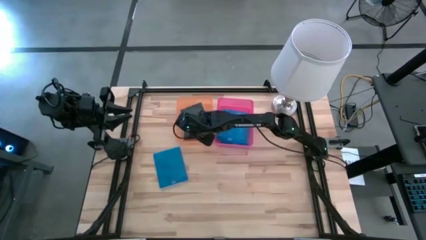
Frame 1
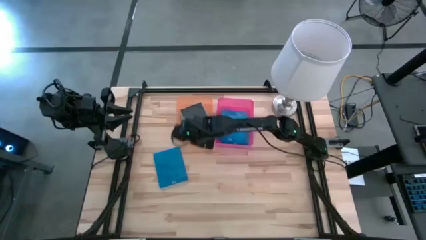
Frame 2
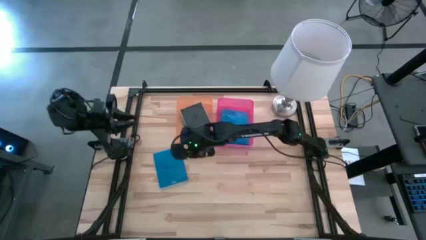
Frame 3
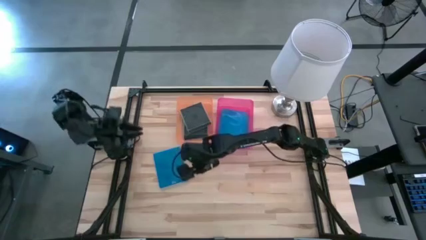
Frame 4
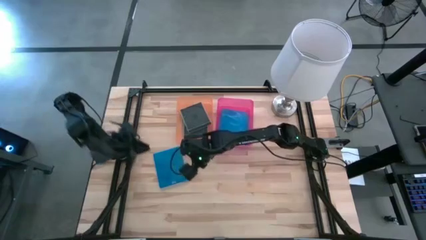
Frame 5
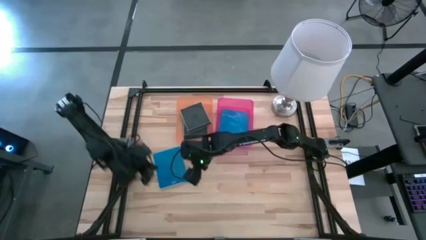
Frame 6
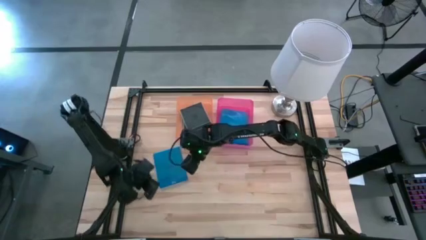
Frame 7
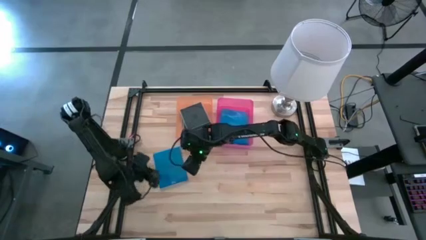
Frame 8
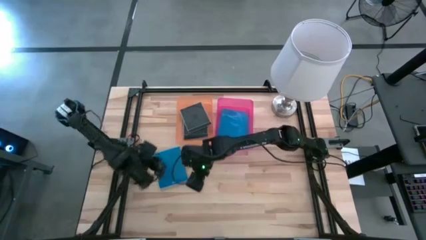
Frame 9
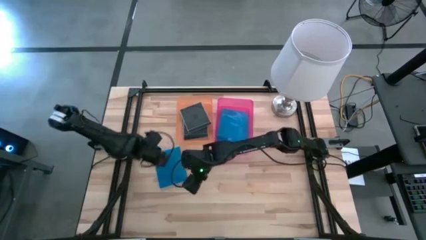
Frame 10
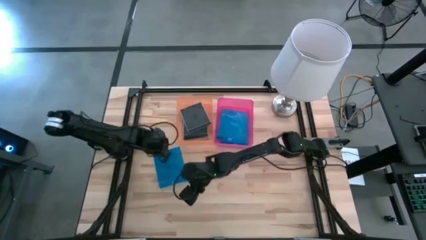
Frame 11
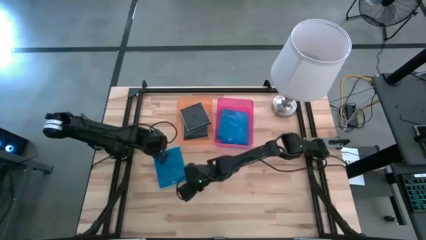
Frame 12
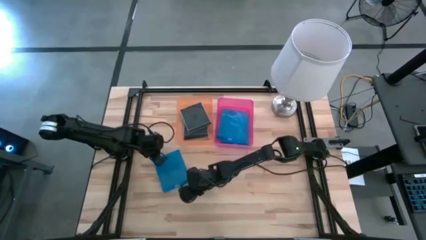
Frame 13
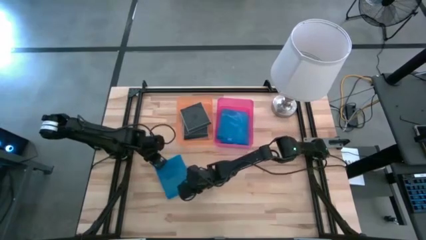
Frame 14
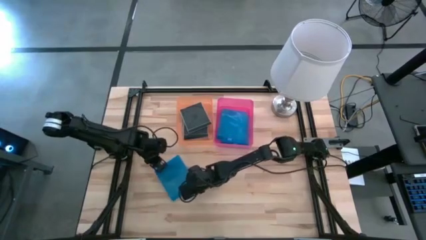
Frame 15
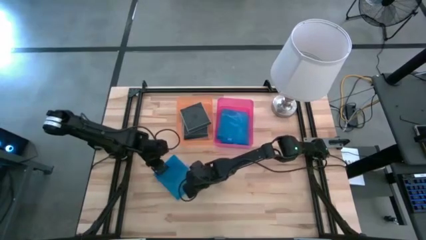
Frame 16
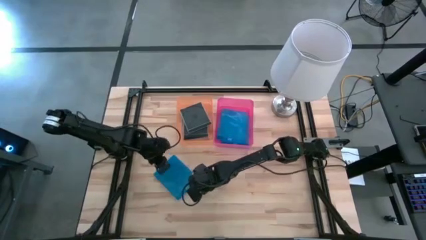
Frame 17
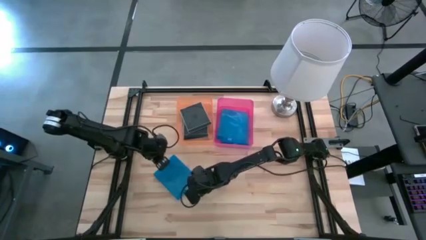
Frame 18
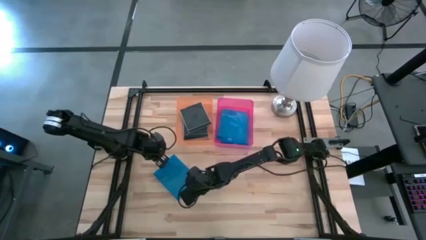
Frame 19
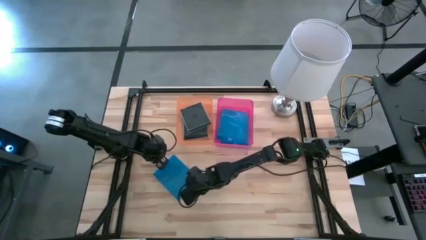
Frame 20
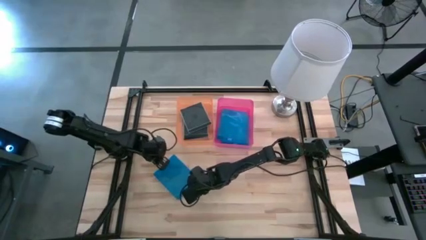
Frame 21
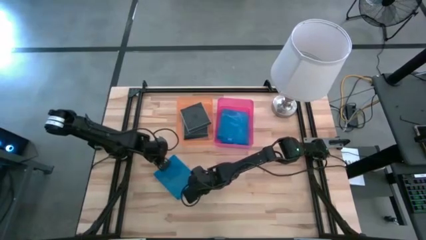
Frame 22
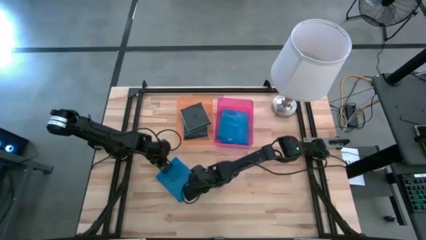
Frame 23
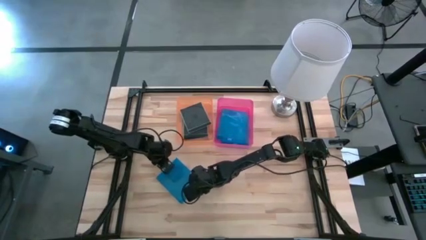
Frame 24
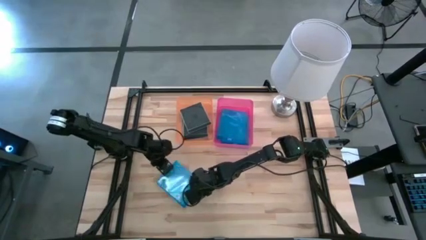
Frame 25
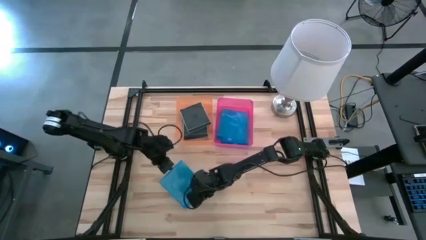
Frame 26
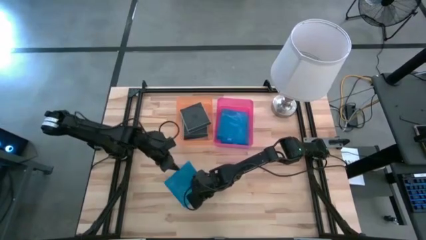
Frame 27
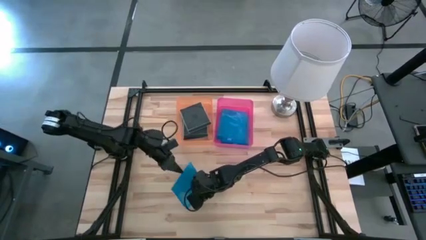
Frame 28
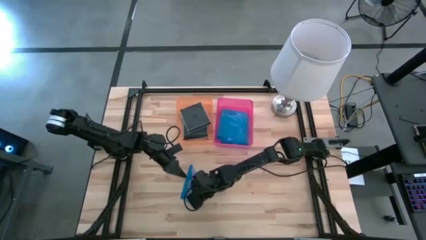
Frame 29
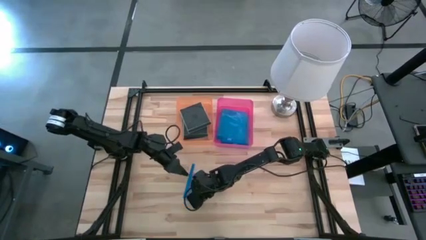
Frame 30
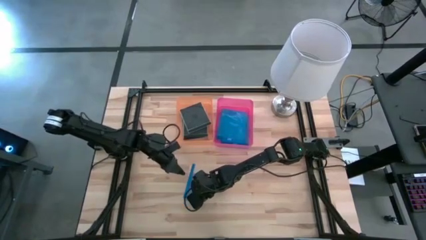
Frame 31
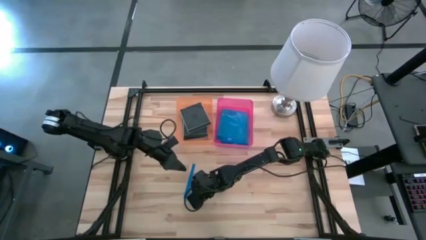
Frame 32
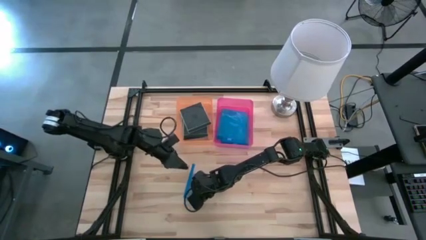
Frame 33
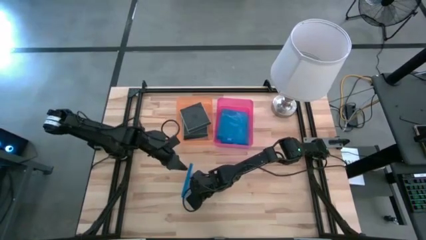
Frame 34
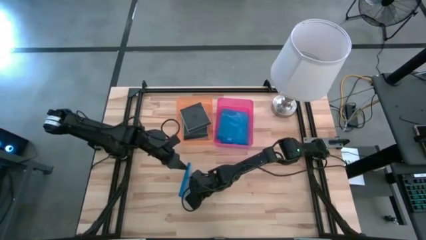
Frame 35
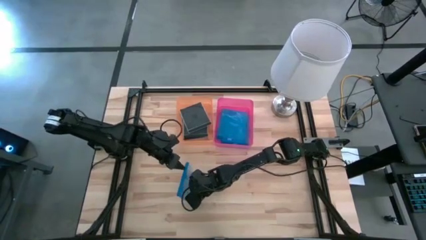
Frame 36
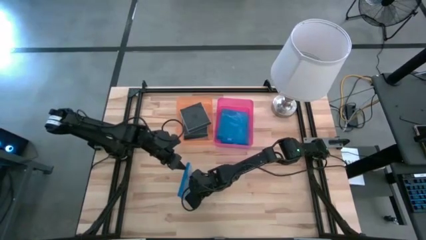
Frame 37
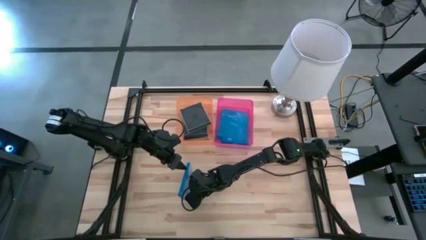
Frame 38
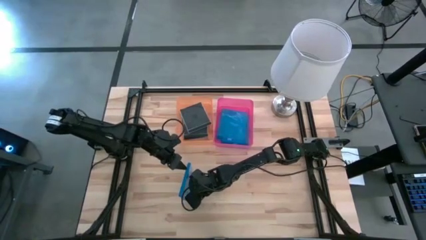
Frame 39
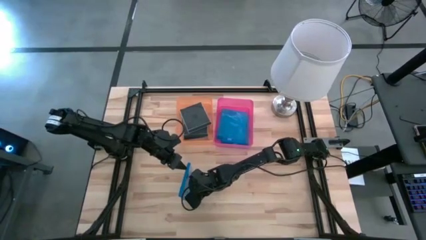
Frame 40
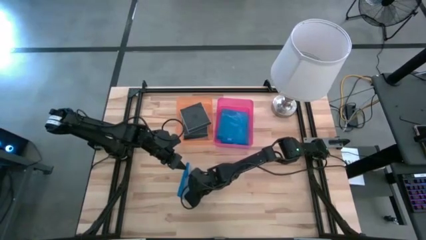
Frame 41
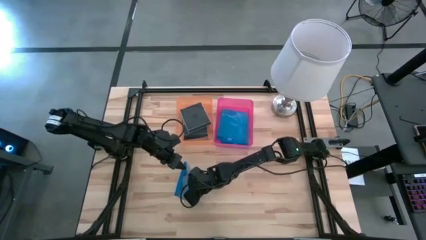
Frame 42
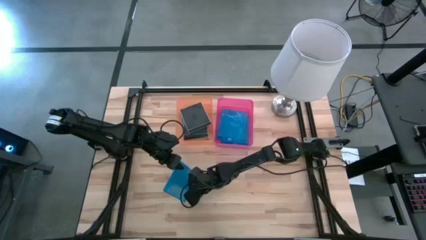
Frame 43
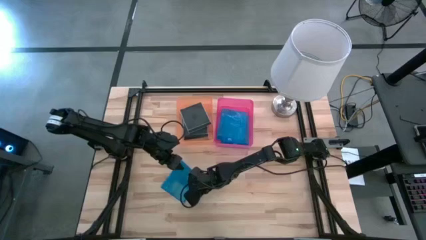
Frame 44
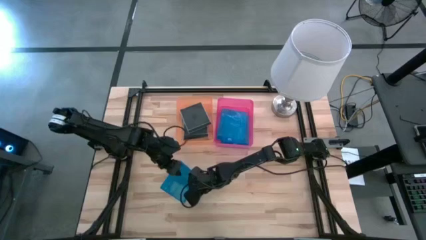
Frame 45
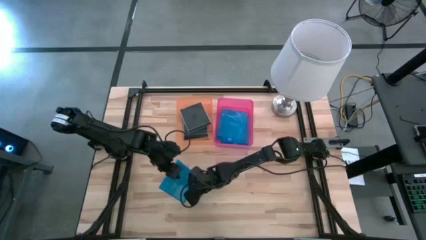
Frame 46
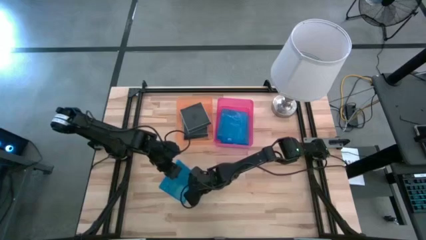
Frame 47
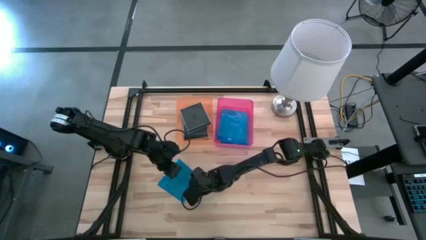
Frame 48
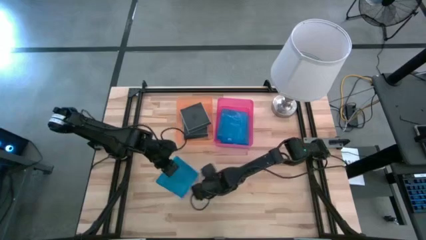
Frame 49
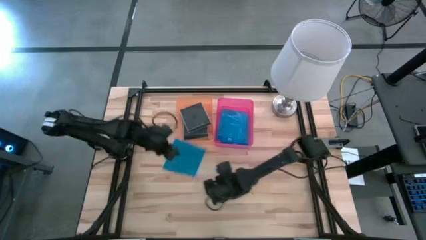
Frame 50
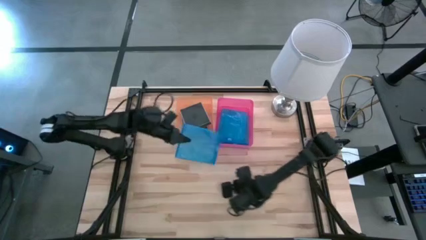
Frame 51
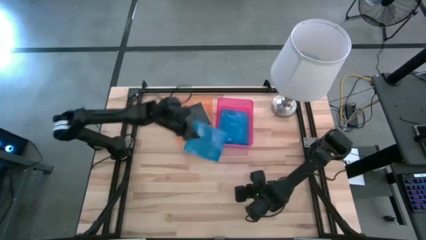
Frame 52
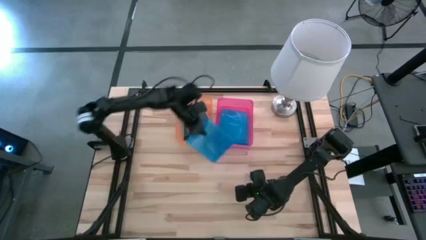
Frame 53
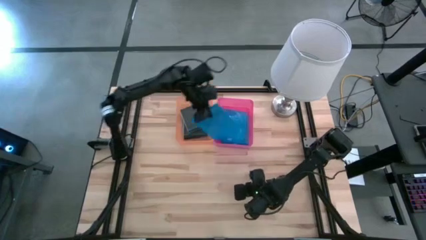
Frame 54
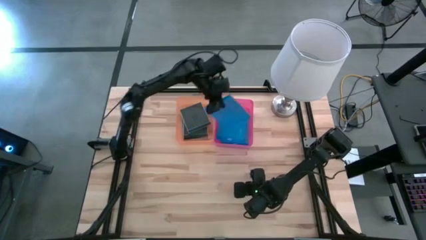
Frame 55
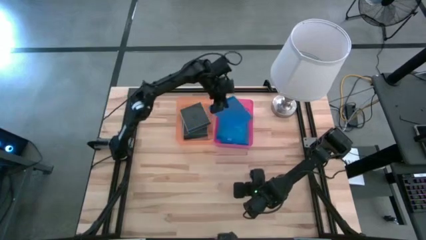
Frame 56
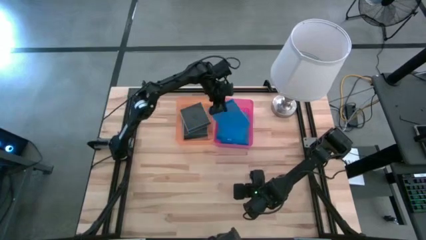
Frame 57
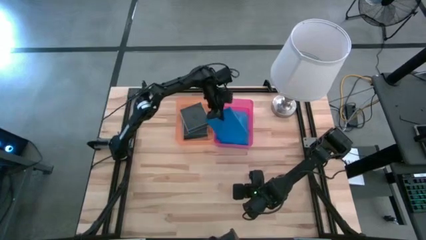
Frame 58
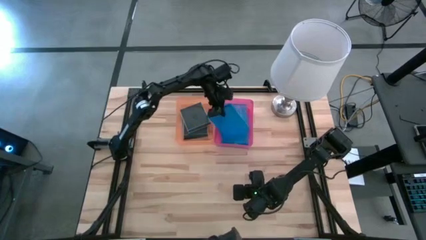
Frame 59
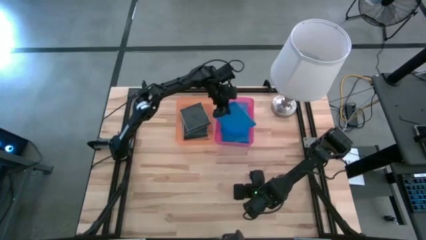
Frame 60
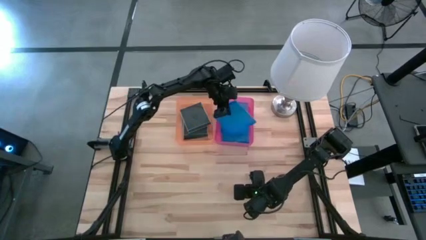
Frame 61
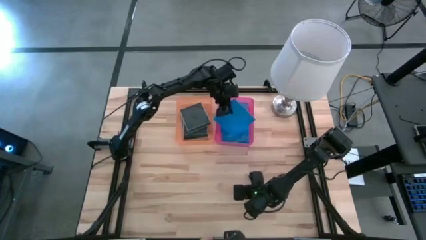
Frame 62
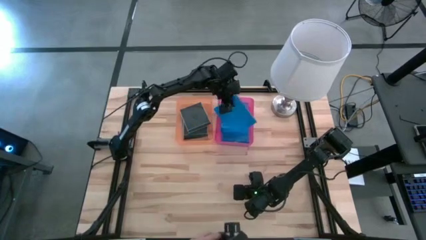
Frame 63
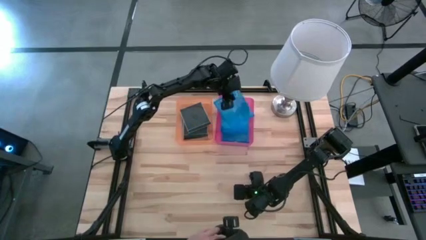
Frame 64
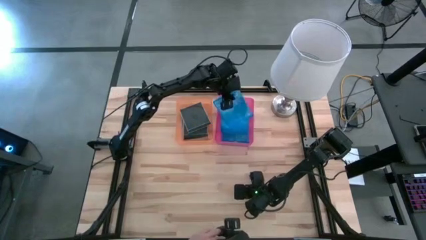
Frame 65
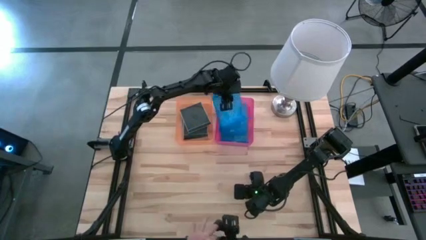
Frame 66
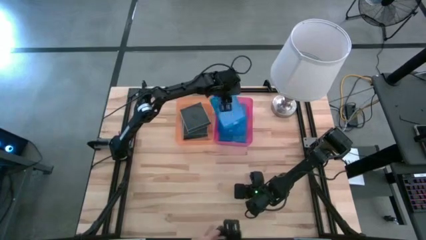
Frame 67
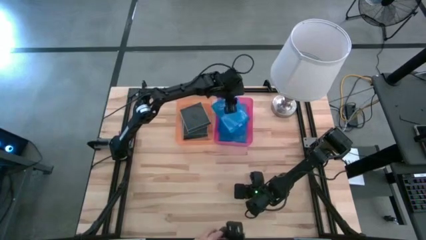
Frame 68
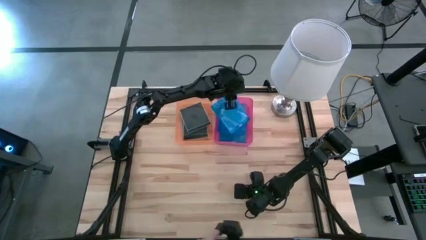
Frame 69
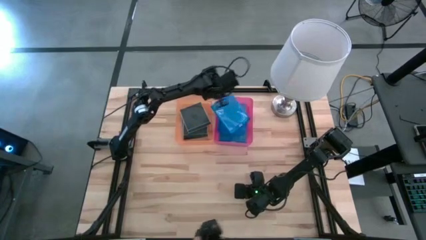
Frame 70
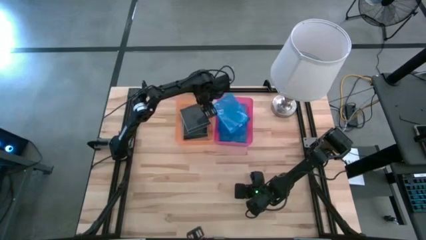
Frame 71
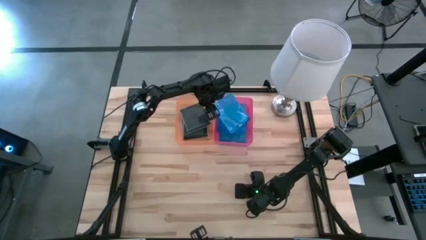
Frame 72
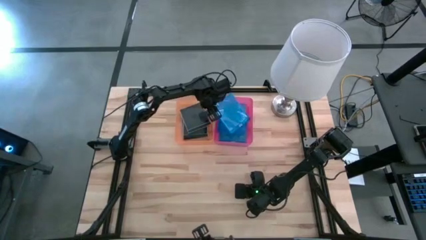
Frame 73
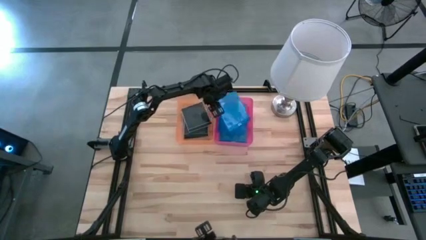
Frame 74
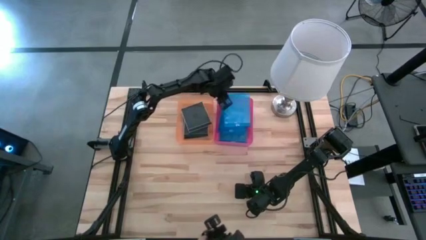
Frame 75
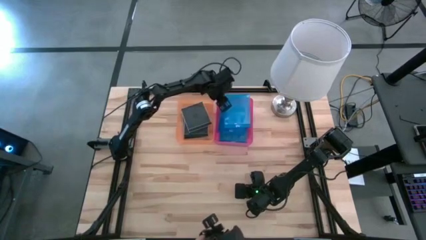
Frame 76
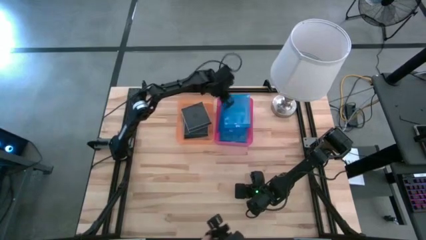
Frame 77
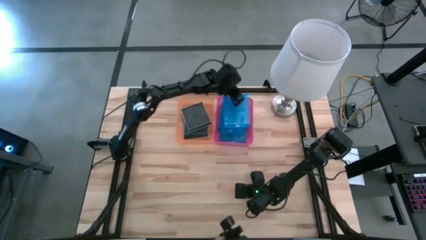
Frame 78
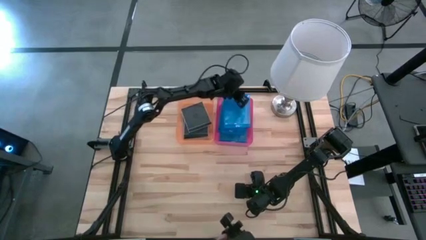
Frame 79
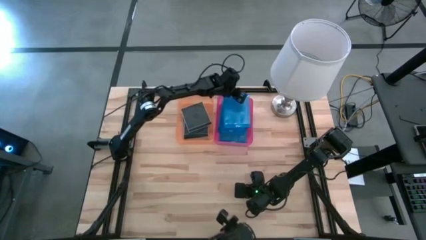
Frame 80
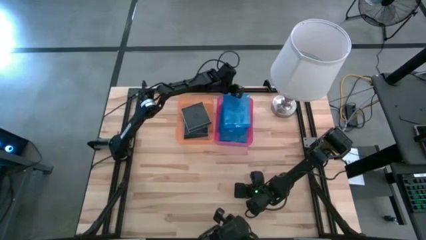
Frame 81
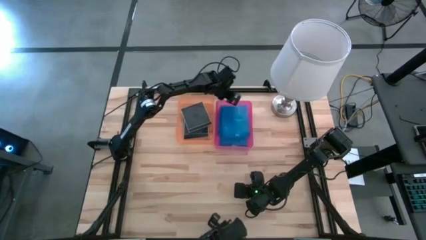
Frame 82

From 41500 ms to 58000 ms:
Task: Pick & place jewel cases by type
Put the blue CD case into the pink bin
